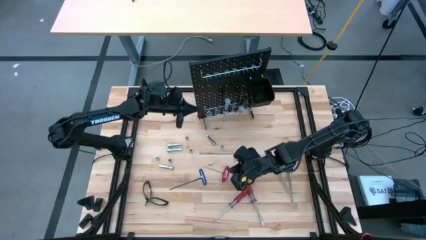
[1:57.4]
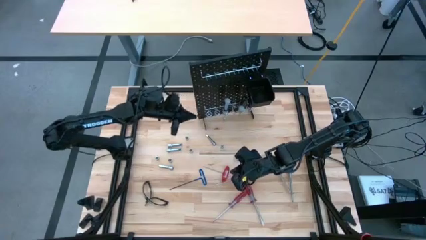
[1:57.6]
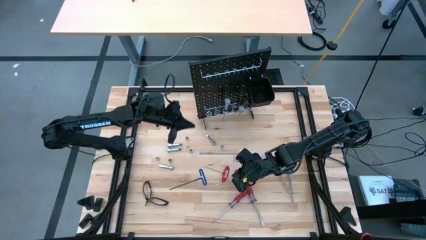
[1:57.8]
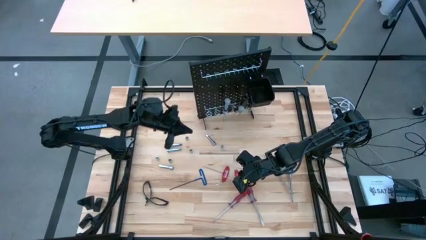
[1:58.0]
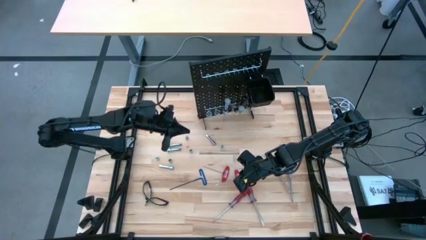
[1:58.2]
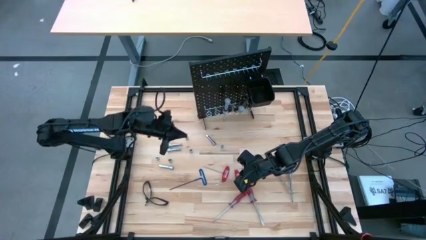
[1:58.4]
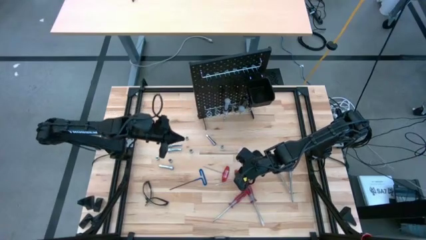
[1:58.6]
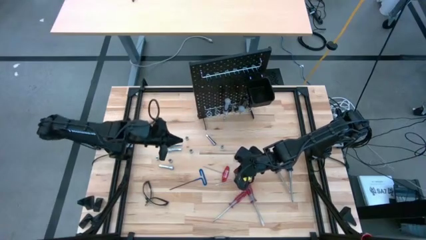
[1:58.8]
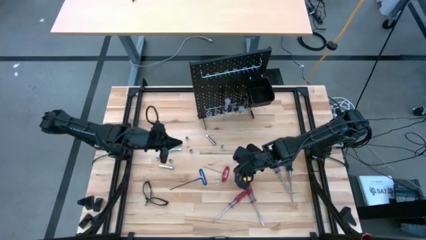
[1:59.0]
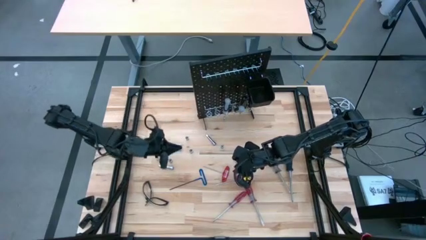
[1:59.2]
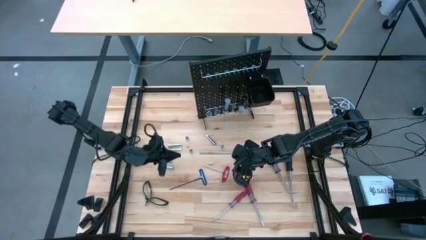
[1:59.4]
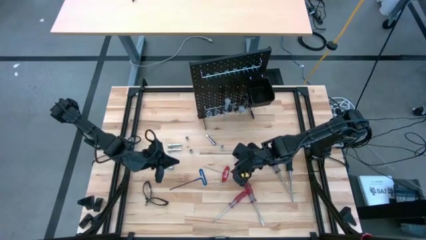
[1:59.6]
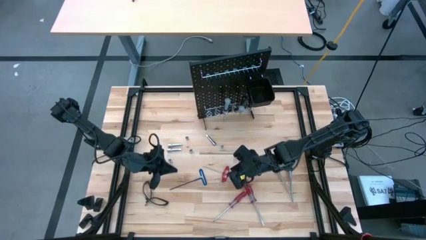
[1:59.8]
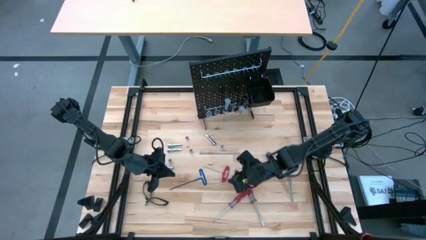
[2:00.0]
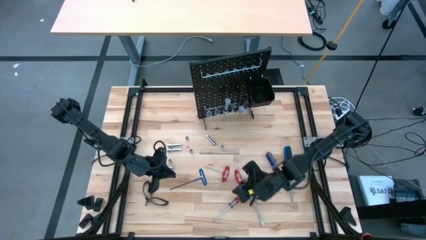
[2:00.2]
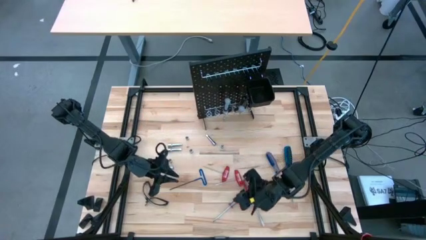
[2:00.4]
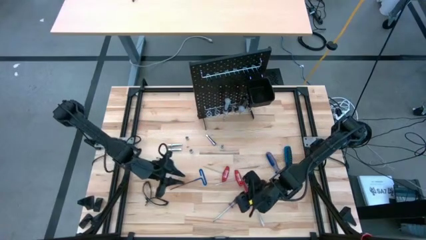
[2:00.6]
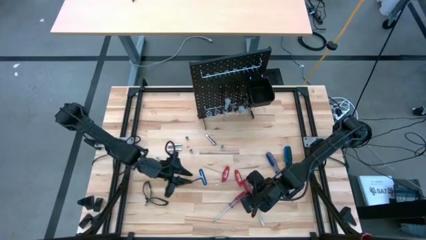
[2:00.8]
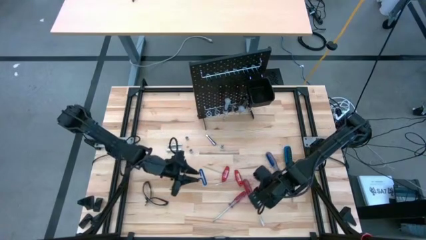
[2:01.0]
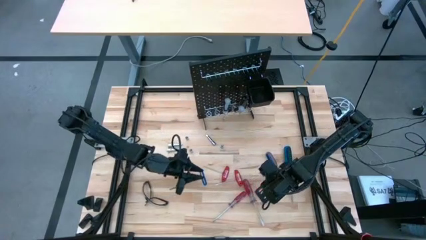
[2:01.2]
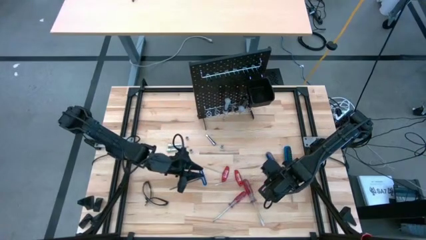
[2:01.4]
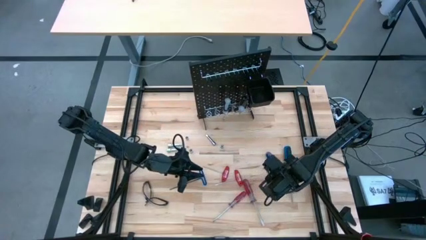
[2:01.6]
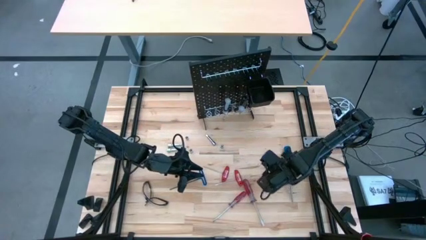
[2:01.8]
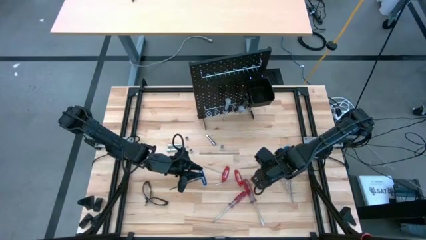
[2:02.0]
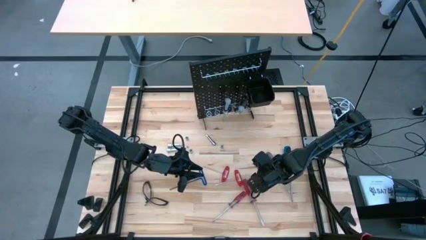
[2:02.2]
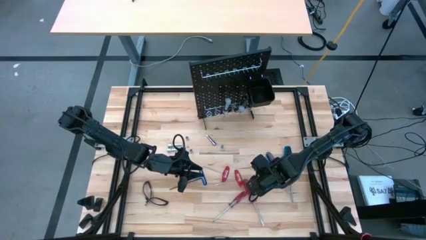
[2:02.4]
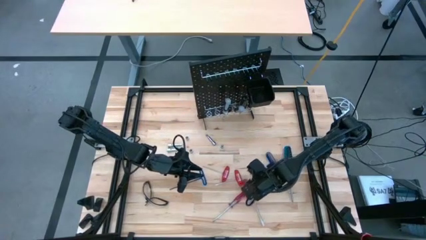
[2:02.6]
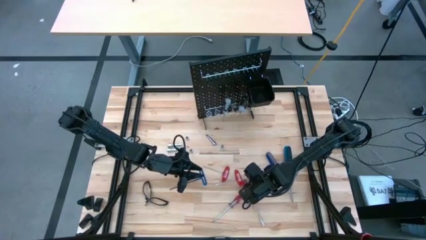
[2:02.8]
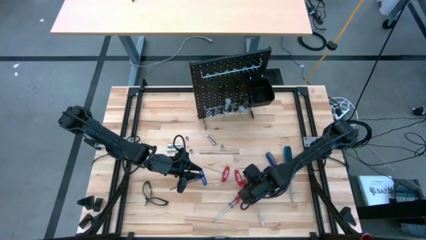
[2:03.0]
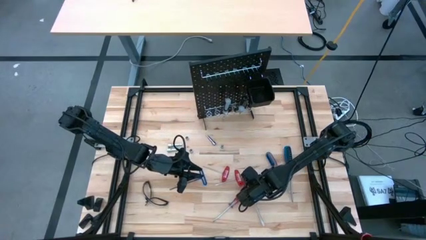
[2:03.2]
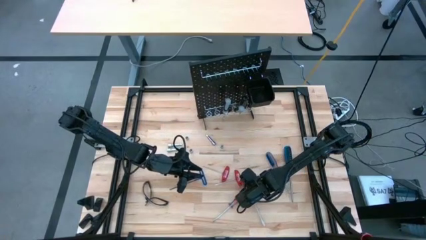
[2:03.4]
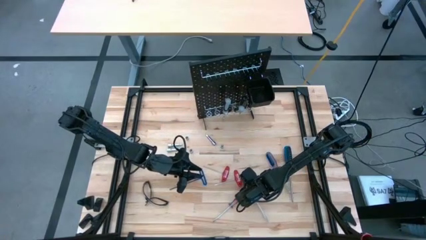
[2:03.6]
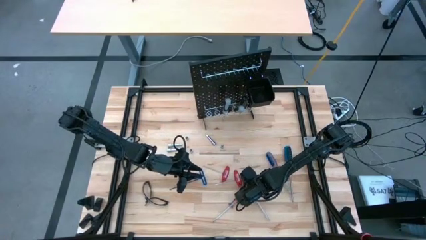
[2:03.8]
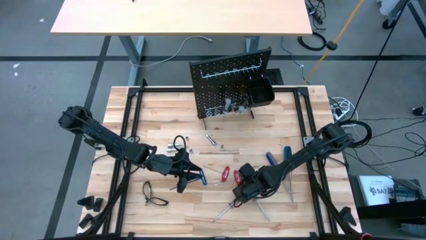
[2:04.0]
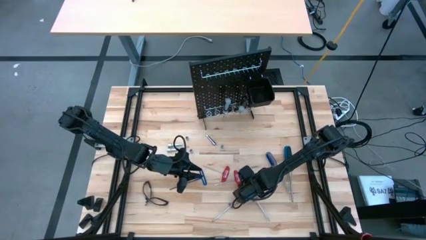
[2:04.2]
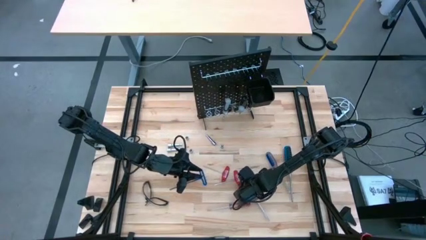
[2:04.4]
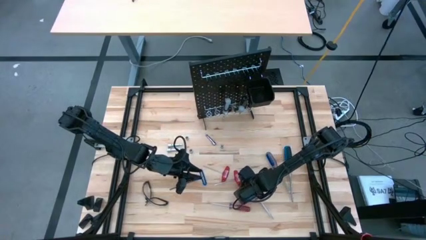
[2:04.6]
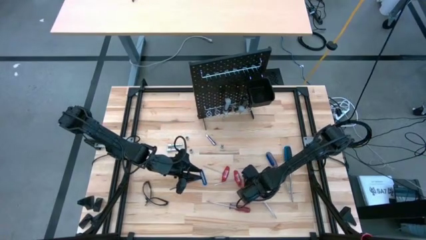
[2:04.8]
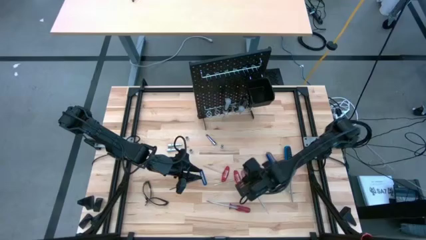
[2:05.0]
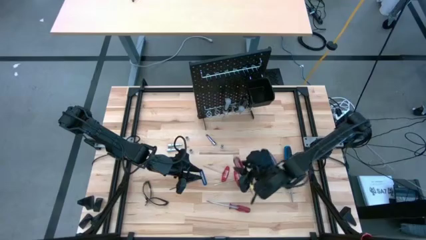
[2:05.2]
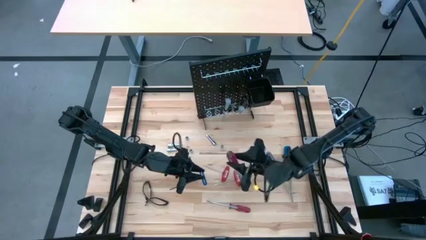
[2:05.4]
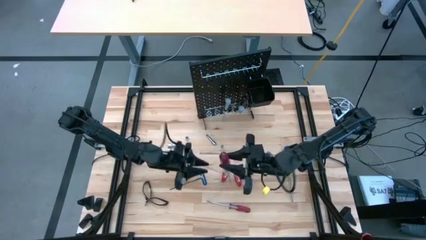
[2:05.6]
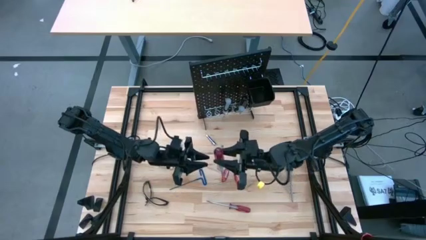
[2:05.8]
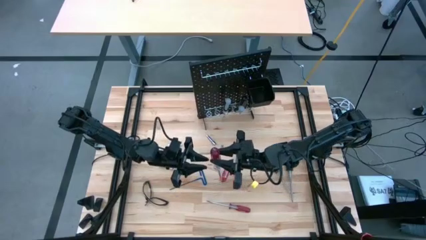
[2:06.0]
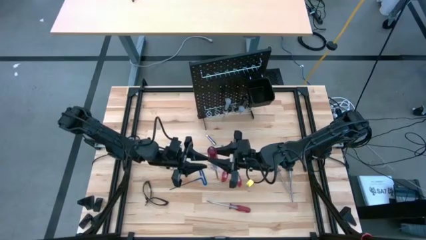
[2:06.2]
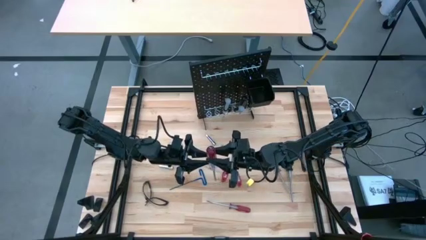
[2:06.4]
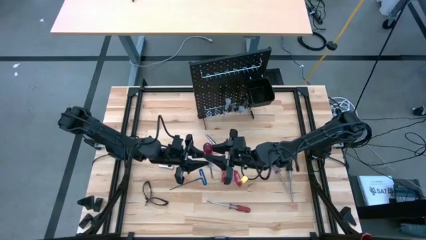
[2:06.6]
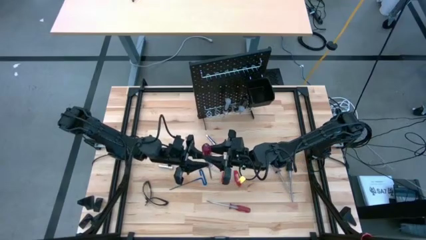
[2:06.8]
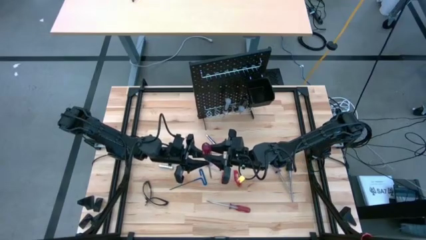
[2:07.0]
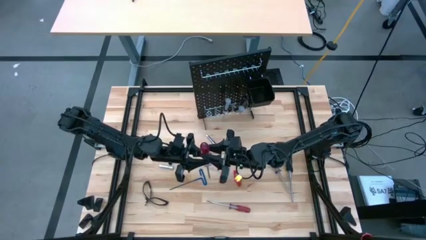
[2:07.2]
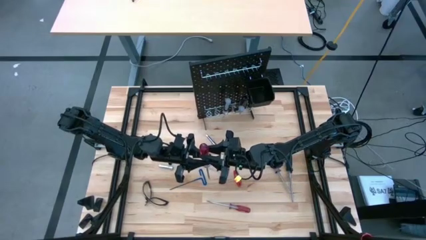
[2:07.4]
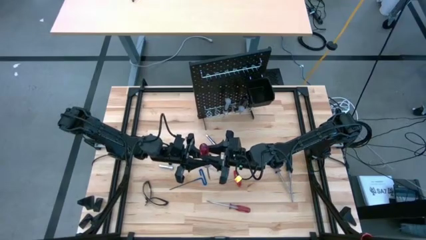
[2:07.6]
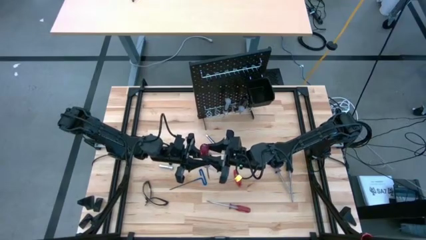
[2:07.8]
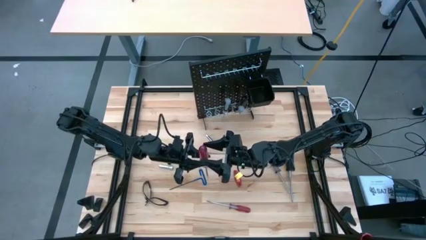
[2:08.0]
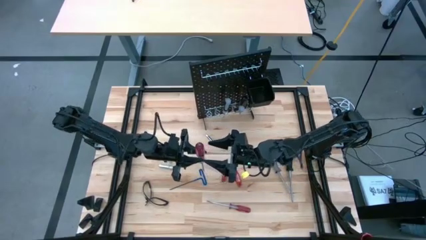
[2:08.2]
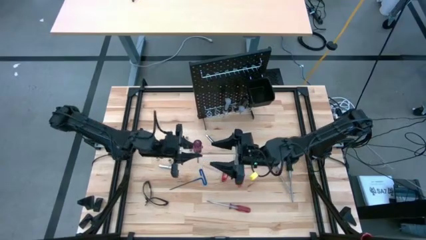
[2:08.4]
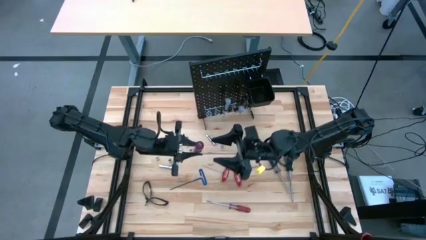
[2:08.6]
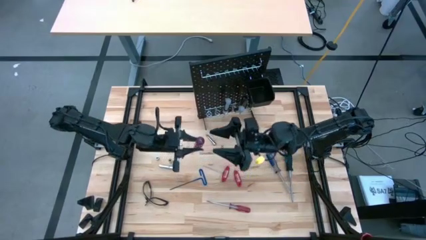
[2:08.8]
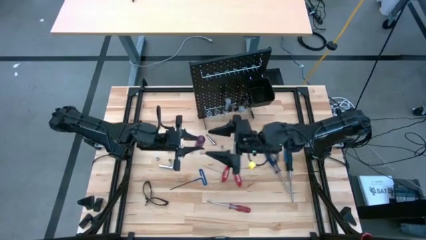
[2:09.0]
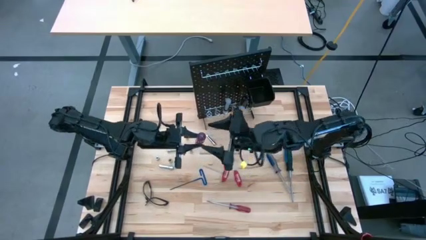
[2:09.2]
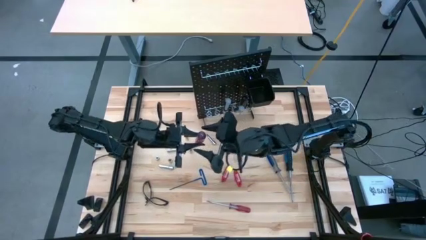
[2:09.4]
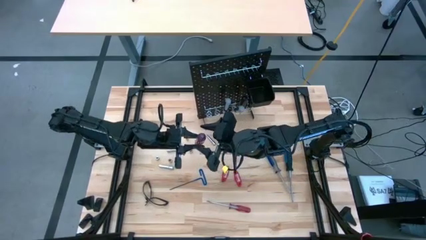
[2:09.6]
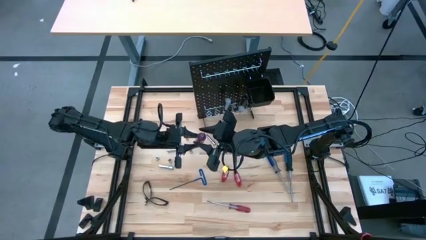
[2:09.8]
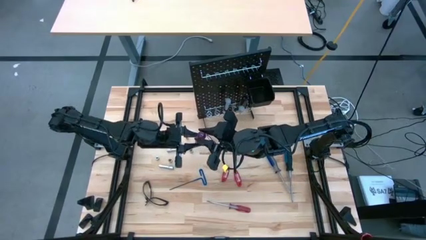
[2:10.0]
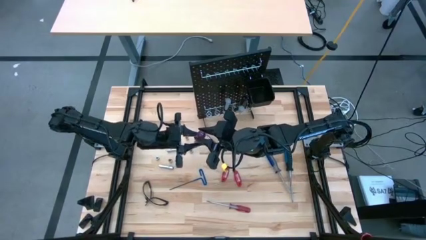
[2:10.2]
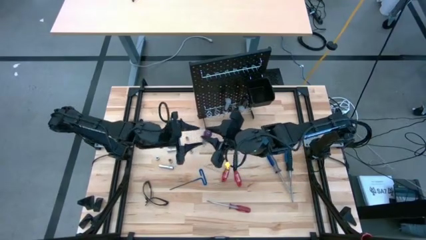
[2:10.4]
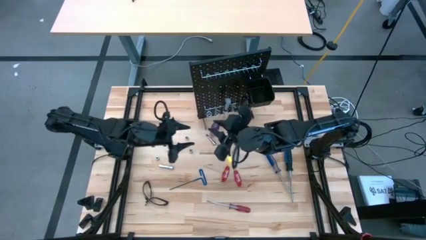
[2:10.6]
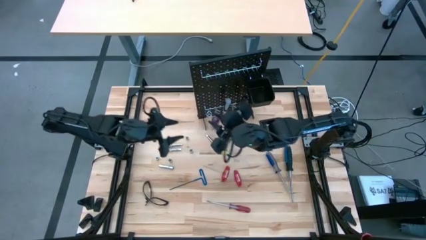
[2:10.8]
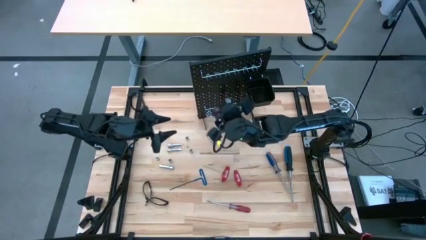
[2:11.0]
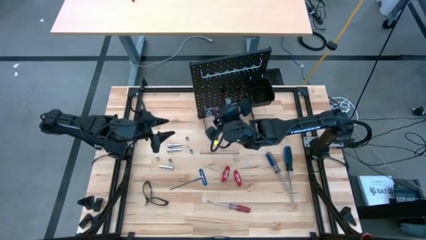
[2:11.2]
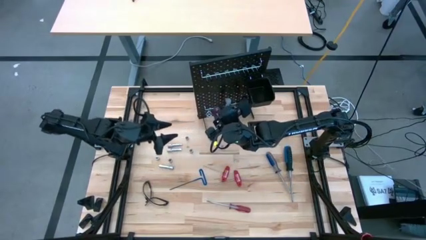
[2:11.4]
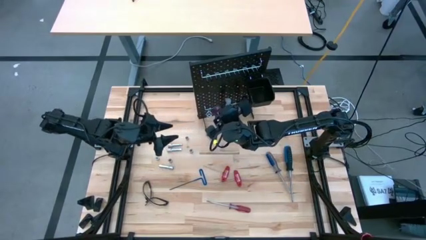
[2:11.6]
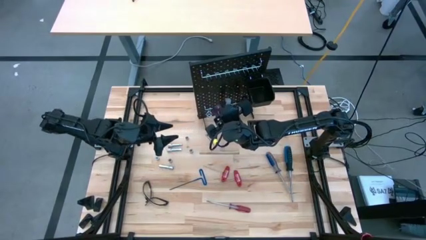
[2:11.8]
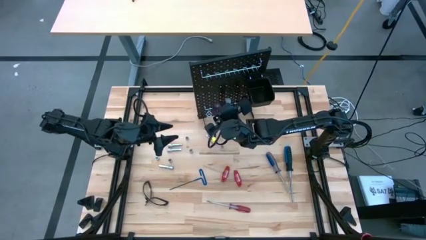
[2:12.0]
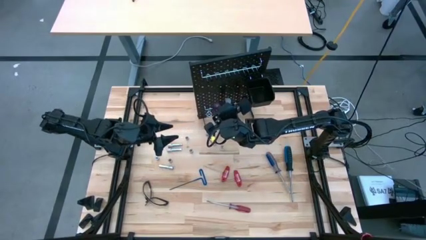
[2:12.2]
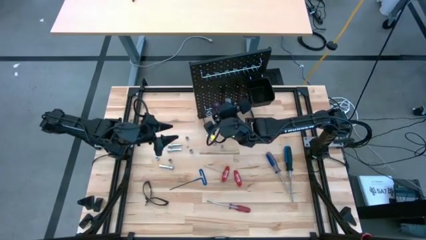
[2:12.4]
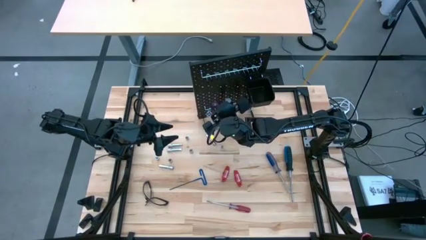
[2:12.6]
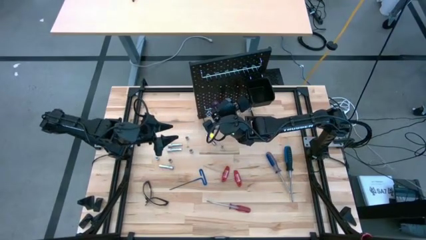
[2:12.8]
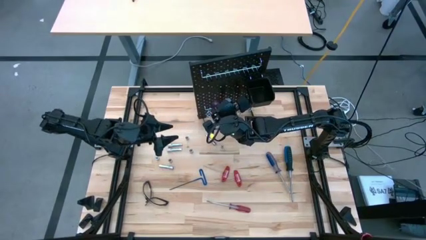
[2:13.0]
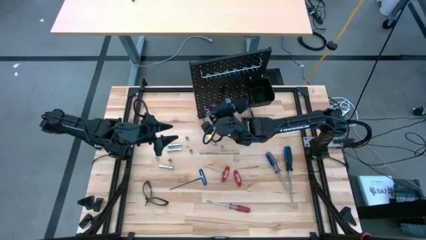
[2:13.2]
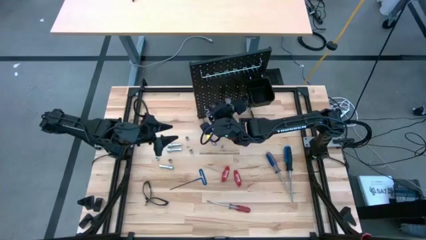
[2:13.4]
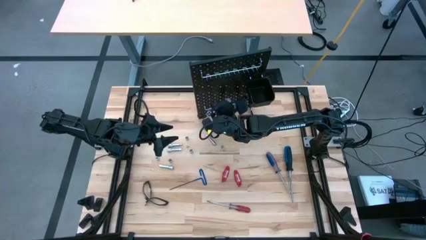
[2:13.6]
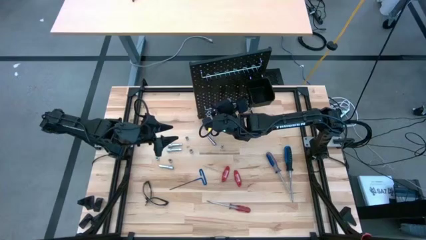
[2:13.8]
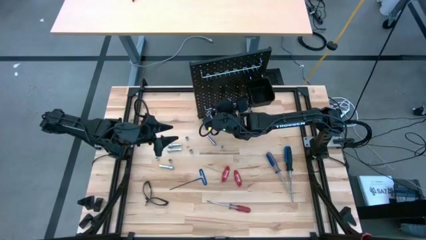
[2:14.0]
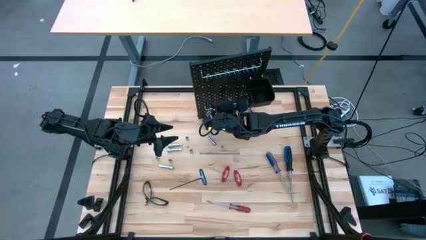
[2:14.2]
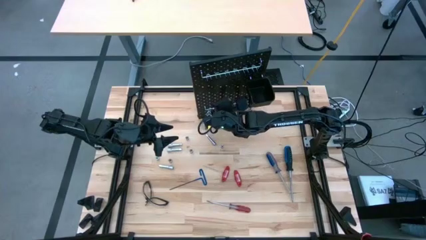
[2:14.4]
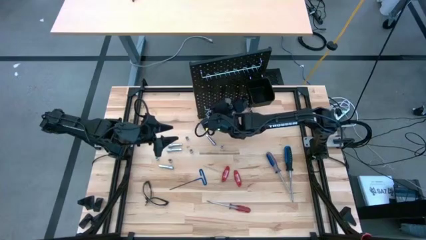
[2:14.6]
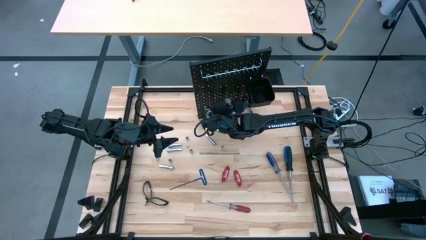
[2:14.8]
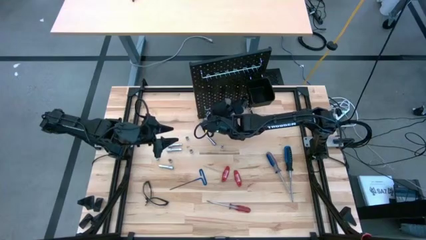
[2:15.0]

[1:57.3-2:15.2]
Task: Hang tools onto peg board
Hang the red screwdriver on the pegboard
